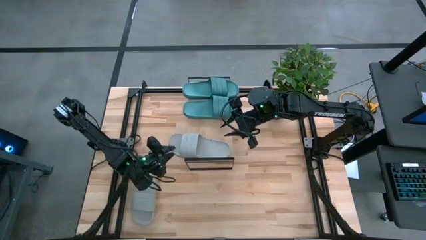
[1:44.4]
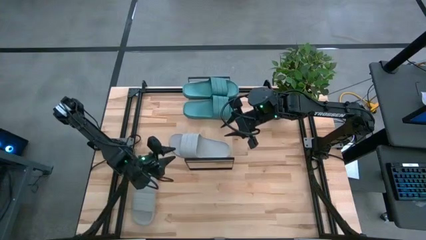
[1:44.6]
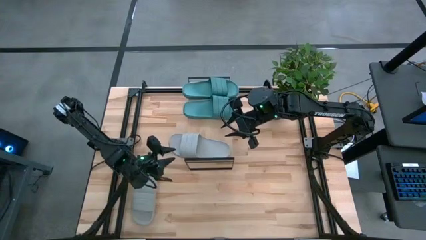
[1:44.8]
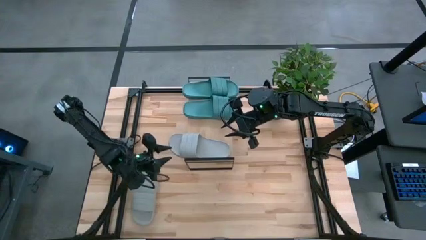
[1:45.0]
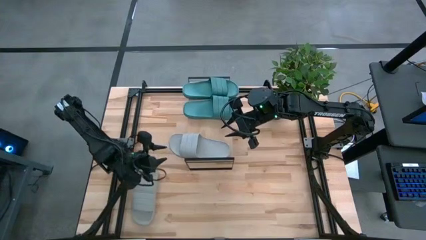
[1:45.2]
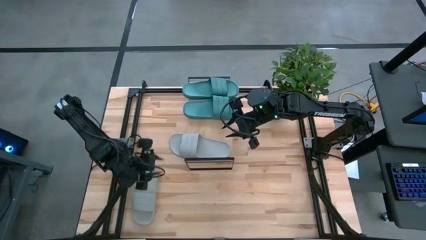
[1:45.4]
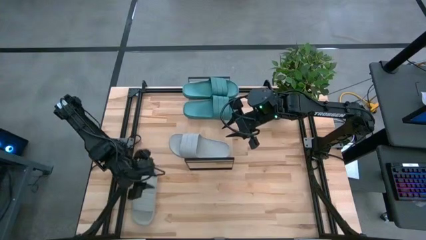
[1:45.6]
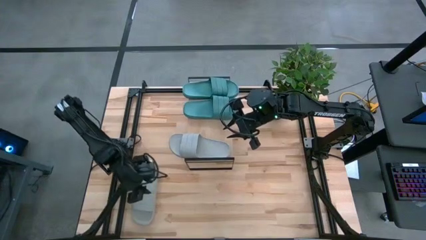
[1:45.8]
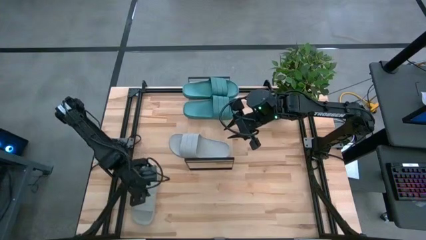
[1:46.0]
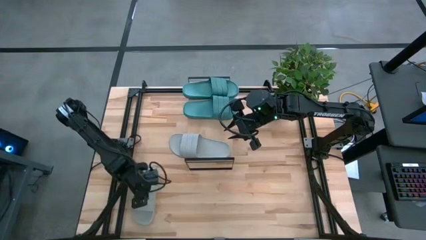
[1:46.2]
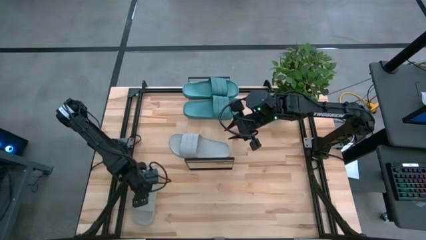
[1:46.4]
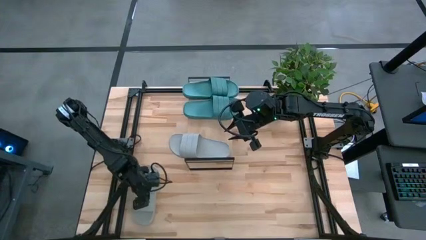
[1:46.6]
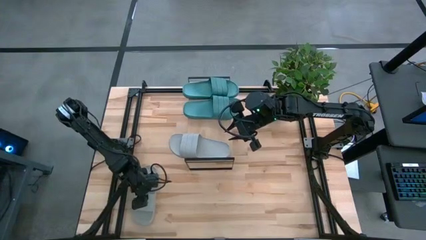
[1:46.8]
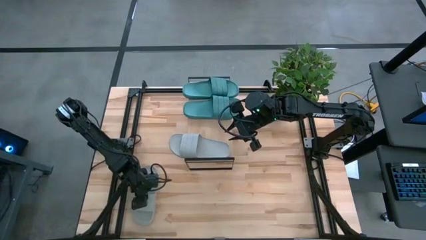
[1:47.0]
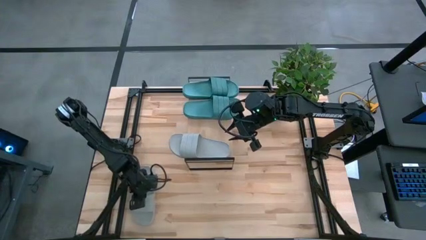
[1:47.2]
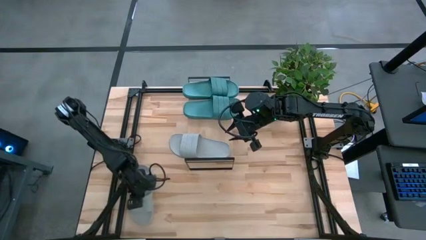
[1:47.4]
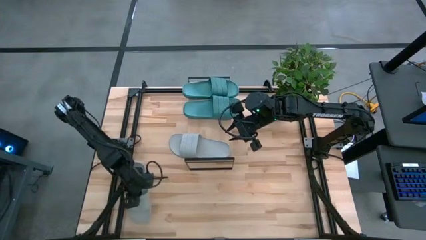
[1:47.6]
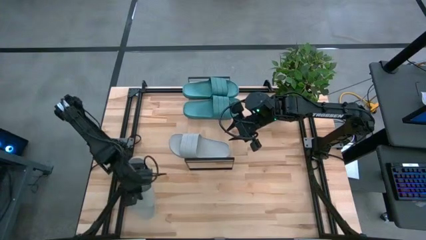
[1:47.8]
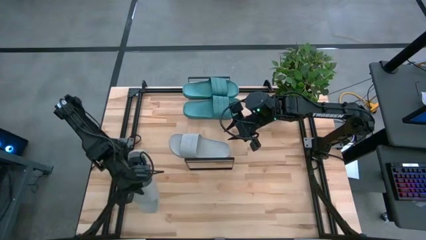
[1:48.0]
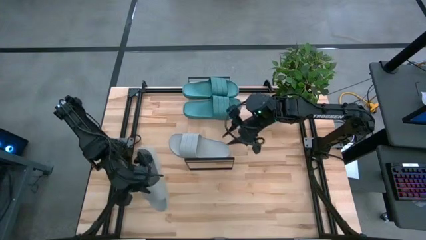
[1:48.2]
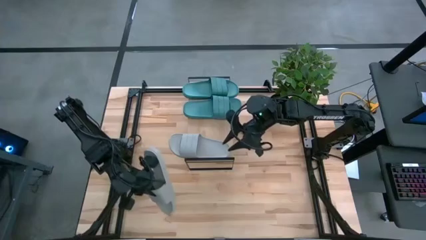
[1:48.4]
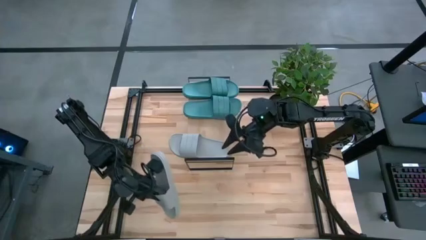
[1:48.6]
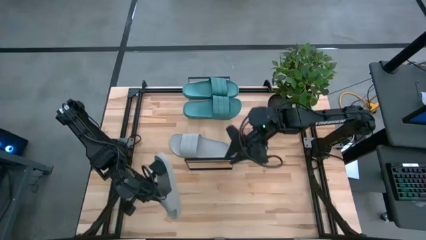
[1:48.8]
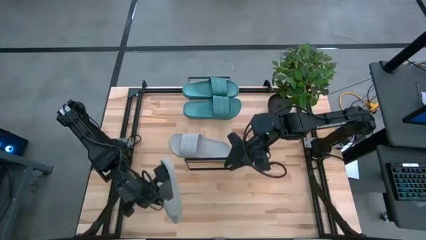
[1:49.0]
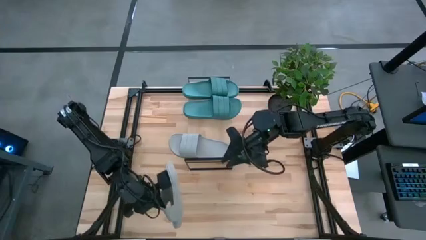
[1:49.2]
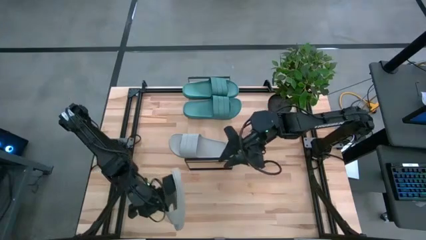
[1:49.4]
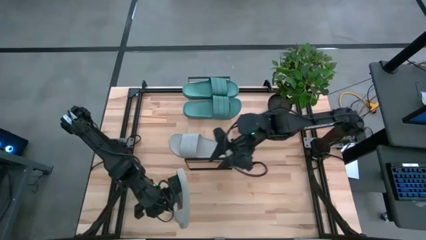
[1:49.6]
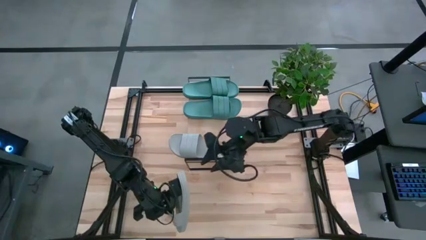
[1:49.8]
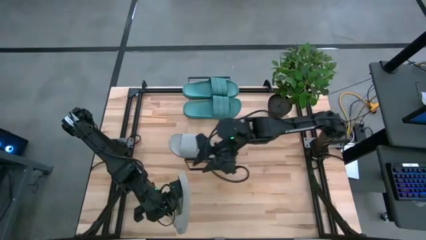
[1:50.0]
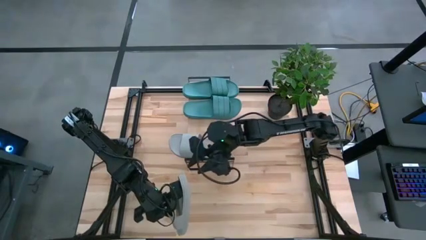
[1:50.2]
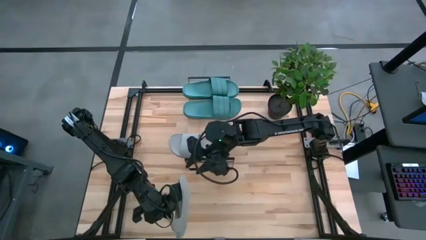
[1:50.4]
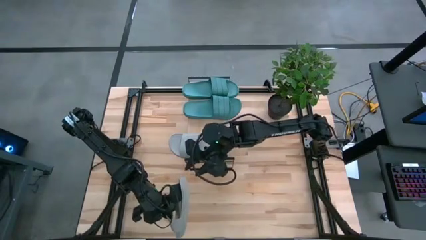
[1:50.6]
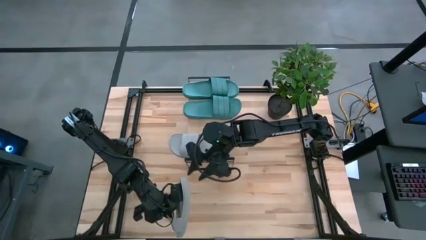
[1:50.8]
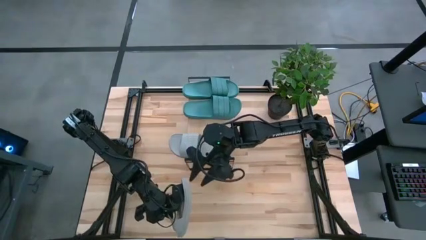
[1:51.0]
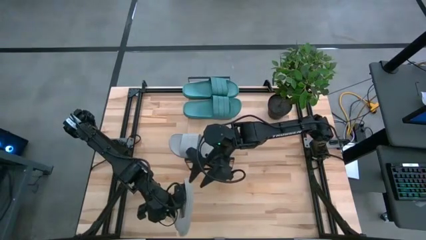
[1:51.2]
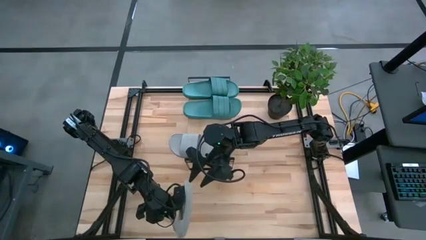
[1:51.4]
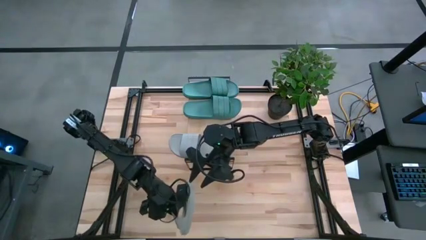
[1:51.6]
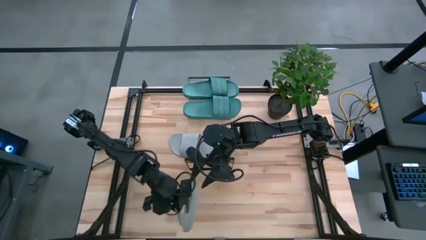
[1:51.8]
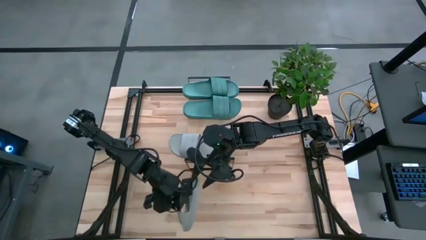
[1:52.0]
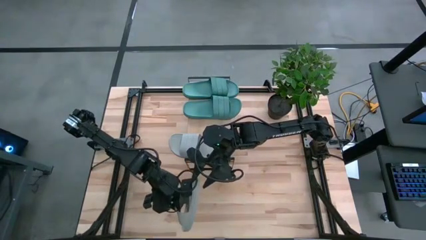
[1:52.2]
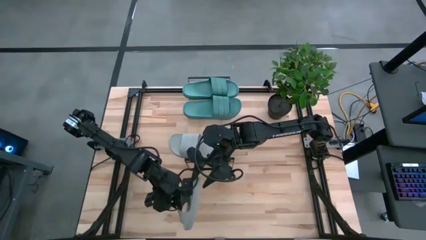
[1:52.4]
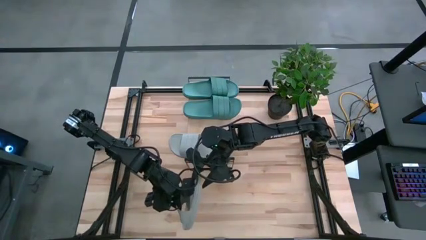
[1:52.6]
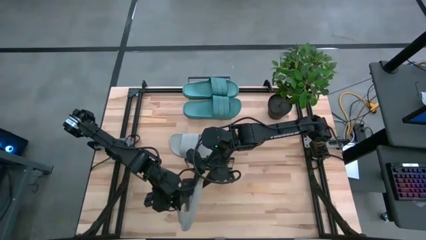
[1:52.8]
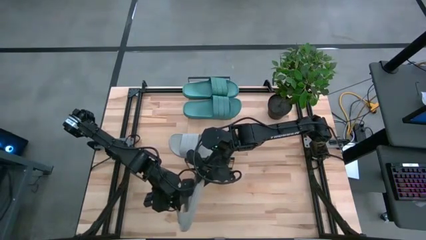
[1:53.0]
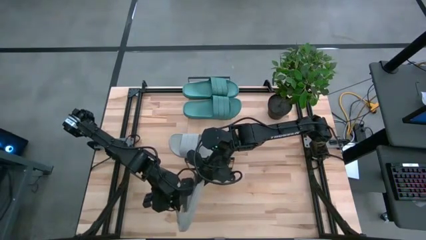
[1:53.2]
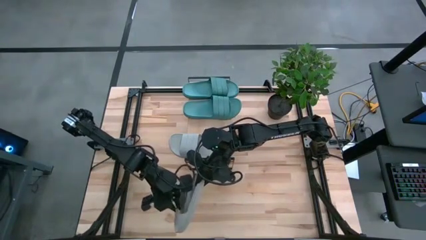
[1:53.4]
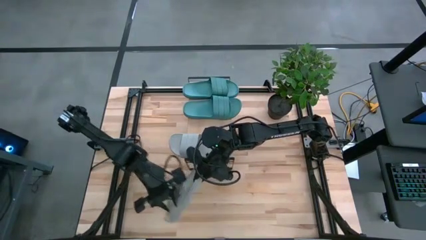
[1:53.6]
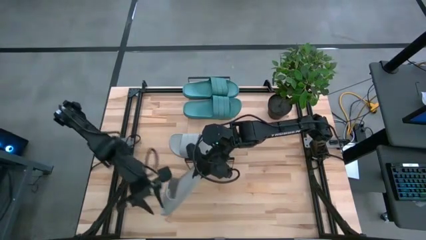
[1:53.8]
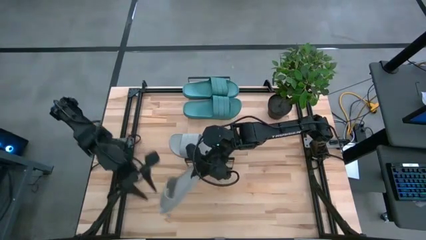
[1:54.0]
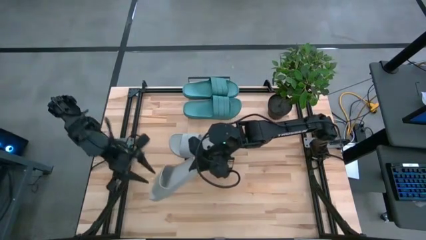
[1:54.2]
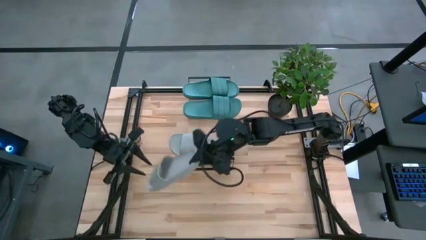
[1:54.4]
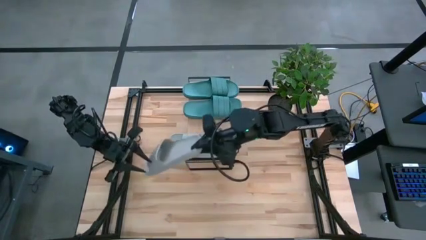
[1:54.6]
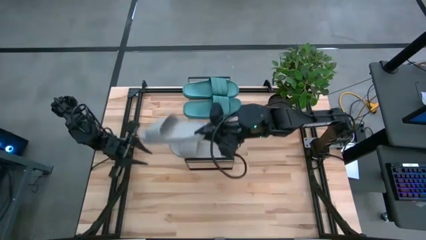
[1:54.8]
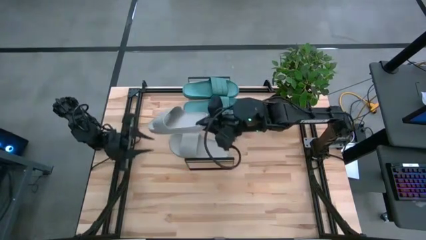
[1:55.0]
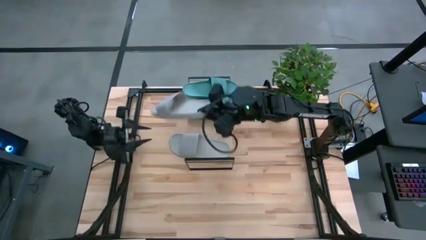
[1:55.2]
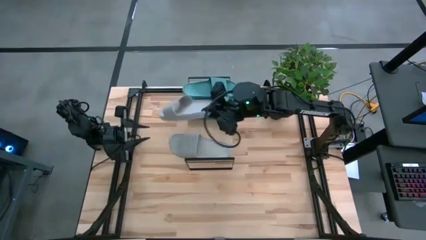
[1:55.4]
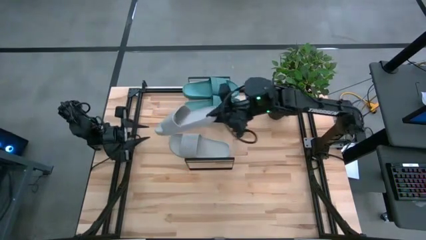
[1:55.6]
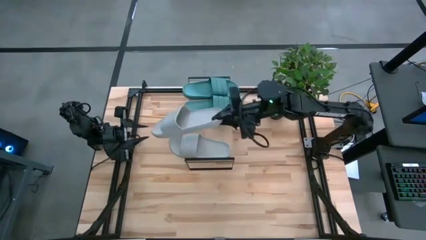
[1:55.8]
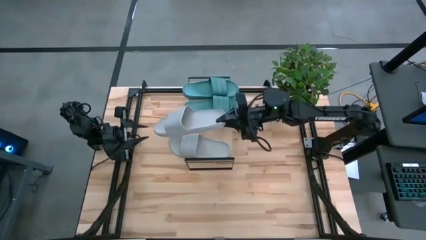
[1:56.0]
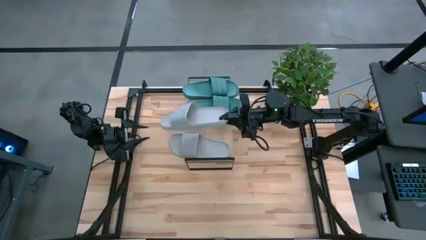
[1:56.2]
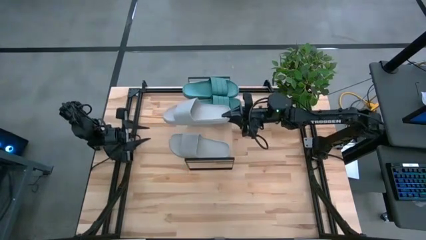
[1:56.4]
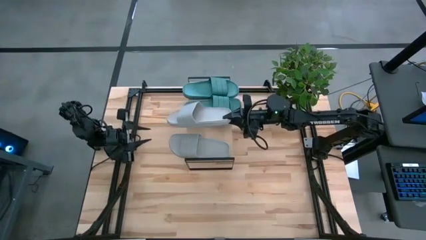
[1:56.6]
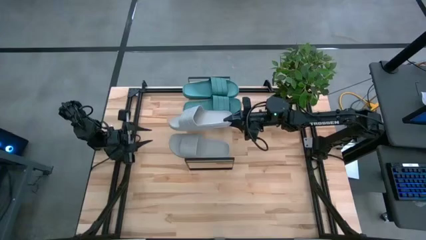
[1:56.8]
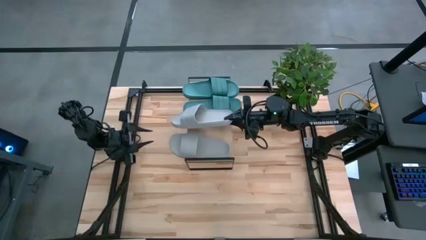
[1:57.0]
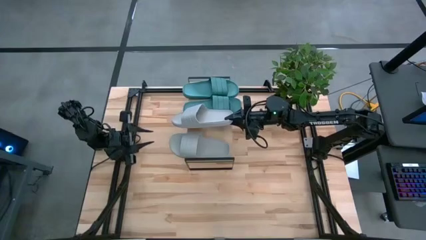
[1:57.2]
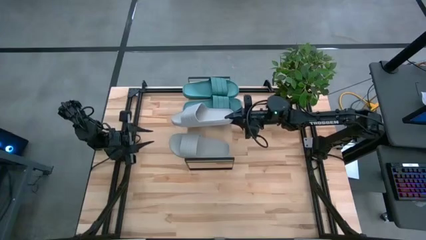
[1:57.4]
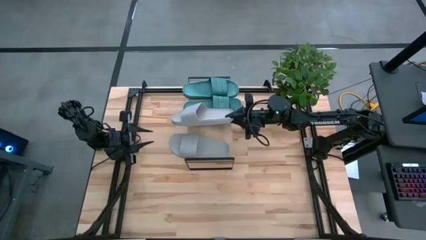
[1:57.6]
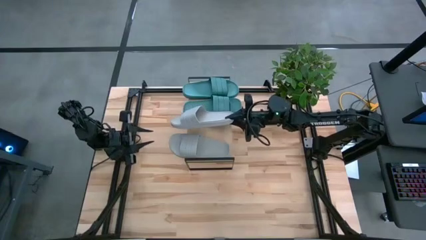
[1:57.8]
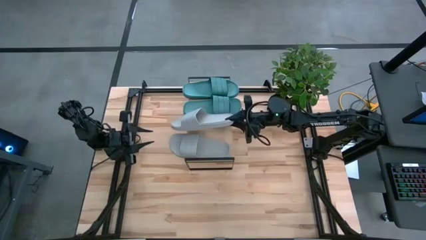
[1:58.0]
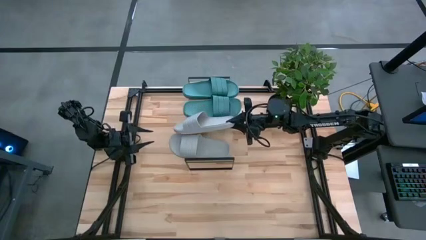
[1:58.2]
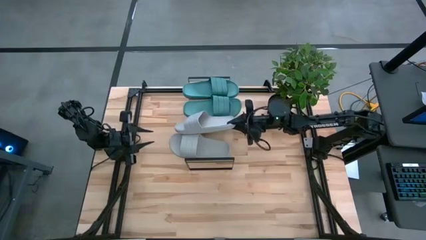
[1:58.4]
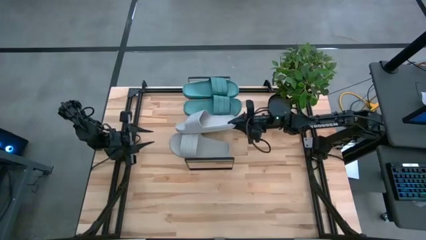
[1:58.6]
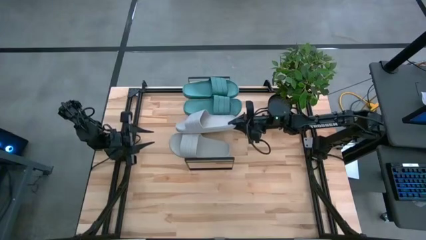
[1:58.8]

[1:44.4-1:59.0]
Task: Pick and place slides into the shelf
Put the gray slide on the shelf
